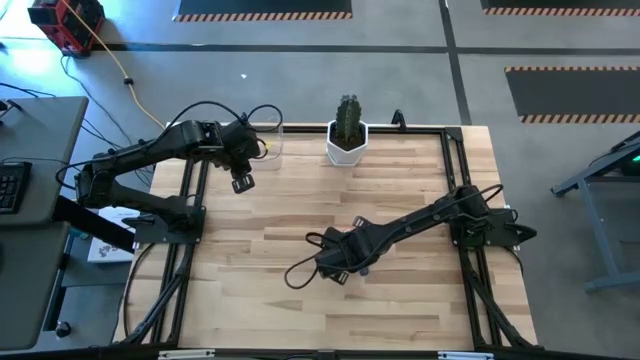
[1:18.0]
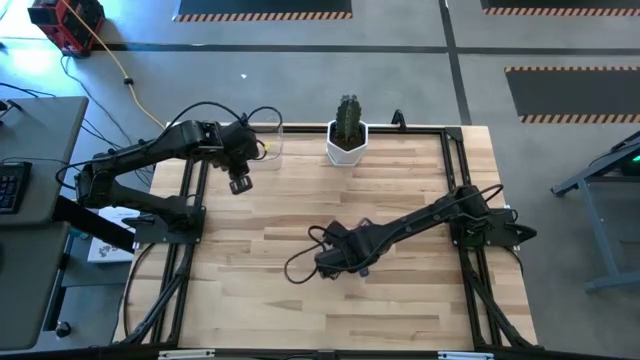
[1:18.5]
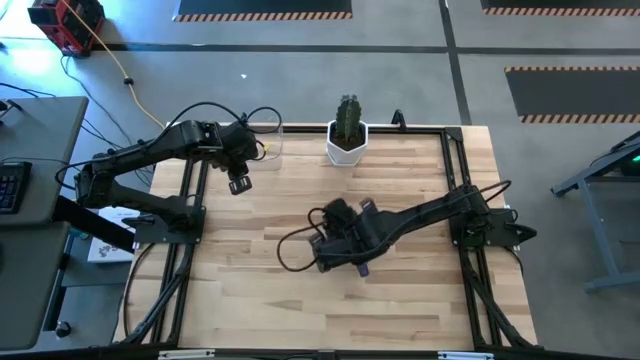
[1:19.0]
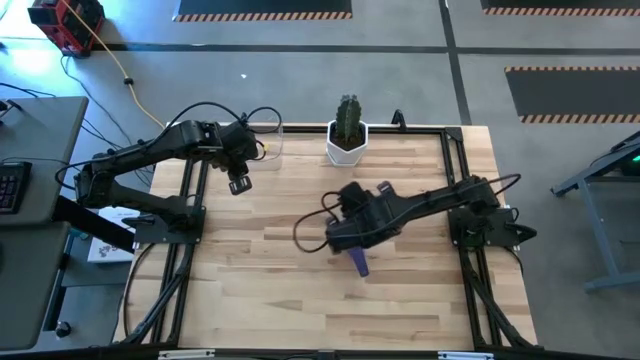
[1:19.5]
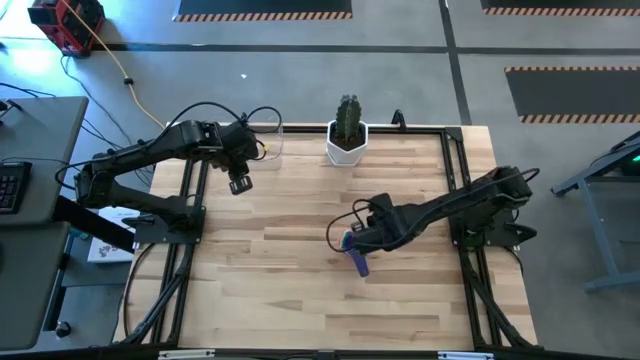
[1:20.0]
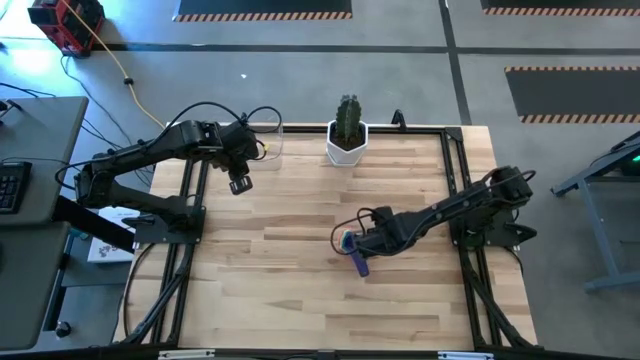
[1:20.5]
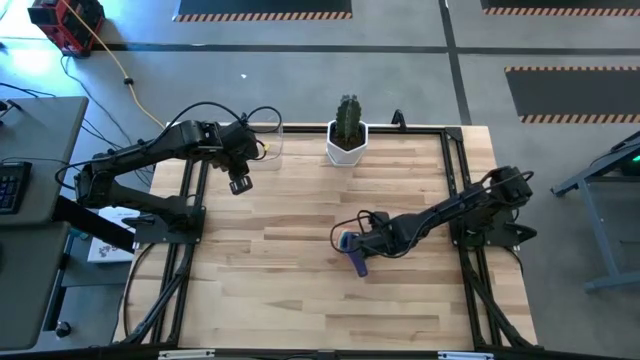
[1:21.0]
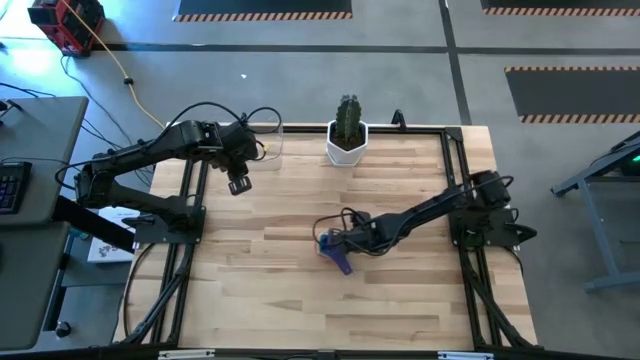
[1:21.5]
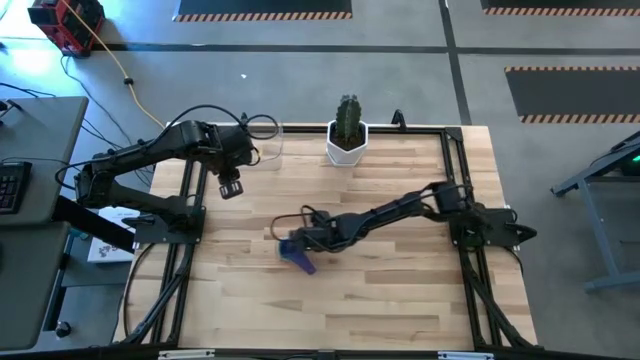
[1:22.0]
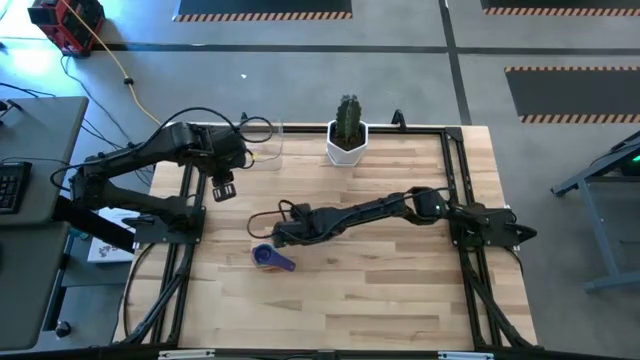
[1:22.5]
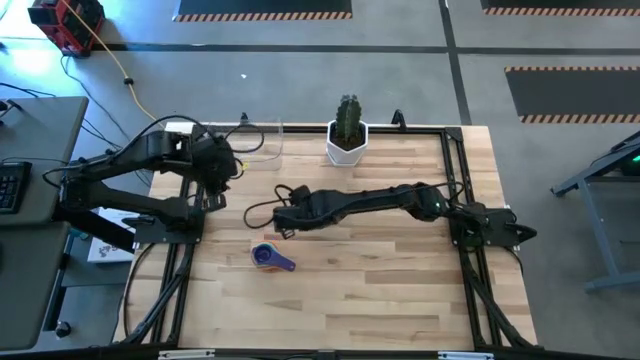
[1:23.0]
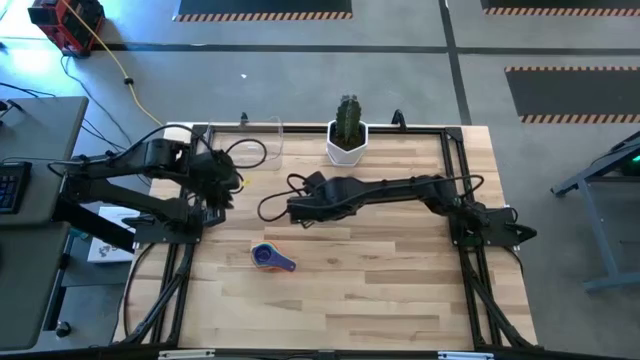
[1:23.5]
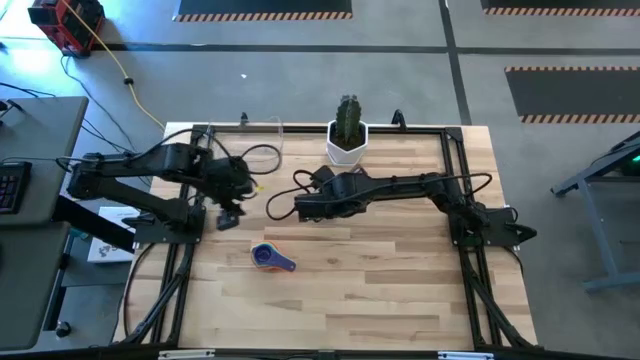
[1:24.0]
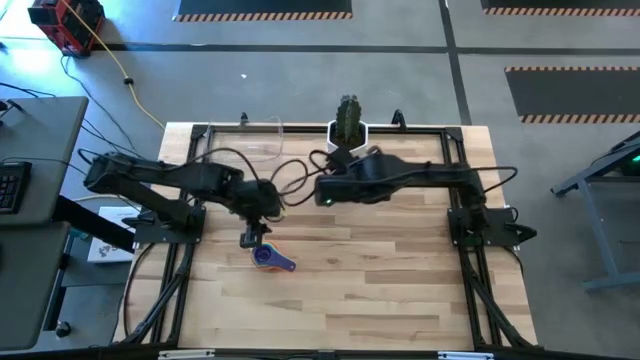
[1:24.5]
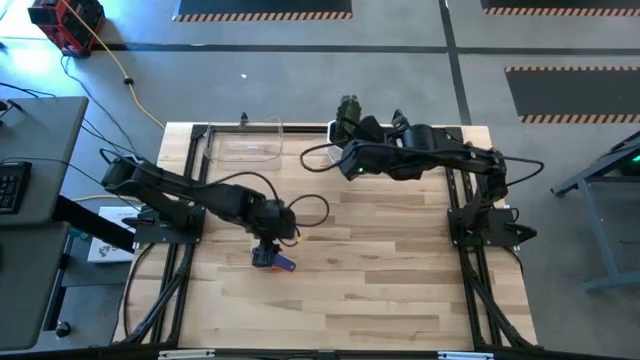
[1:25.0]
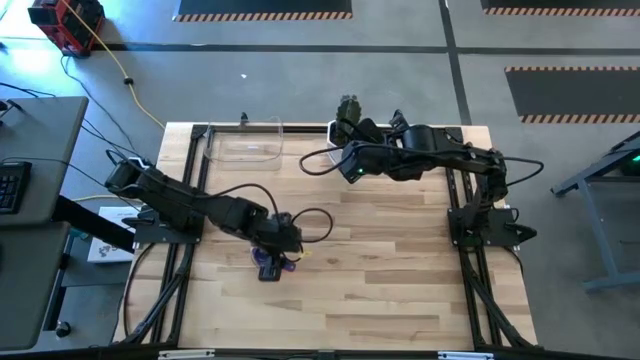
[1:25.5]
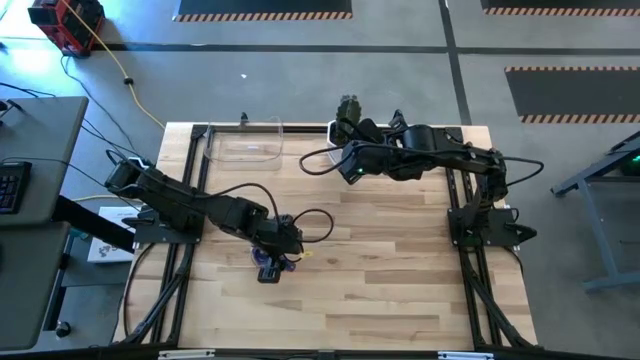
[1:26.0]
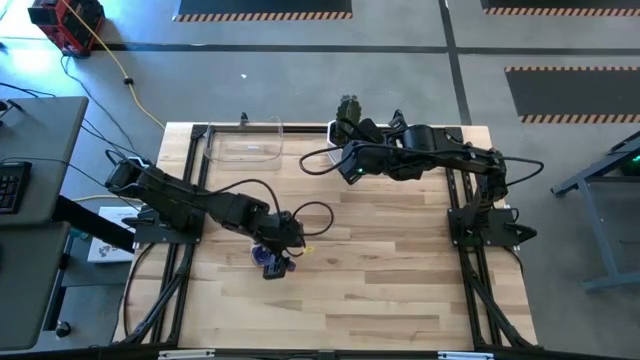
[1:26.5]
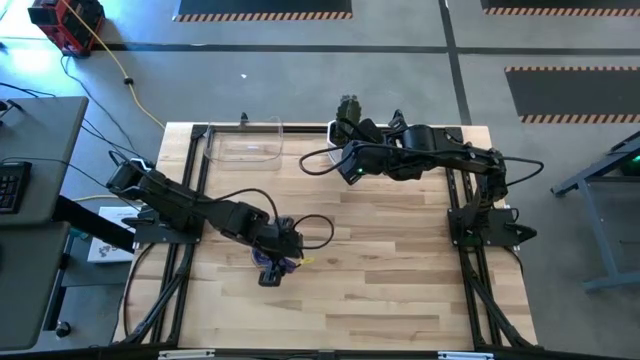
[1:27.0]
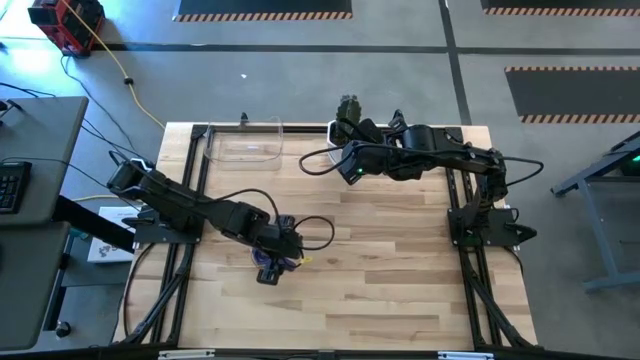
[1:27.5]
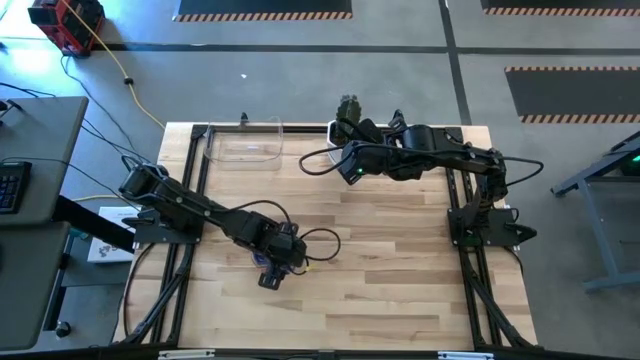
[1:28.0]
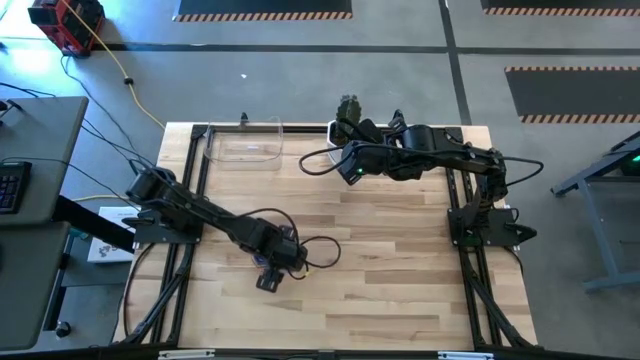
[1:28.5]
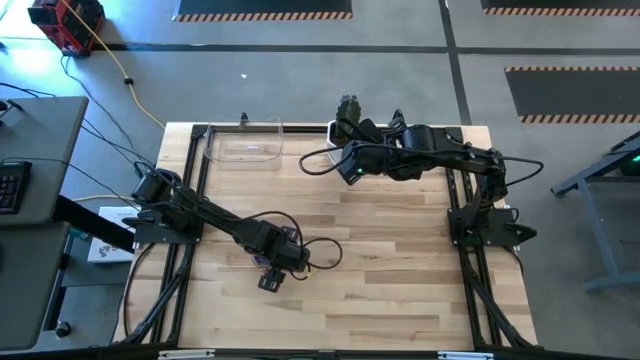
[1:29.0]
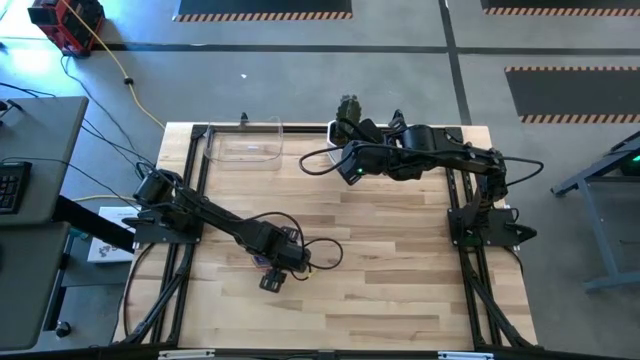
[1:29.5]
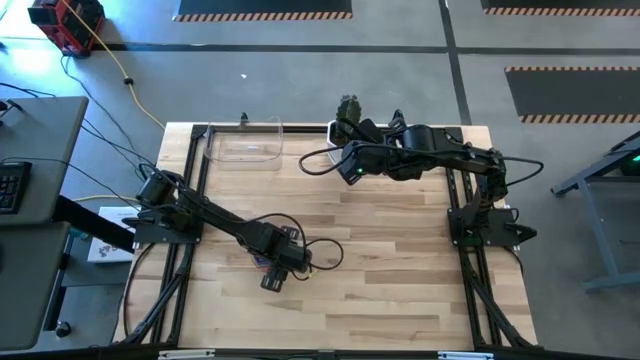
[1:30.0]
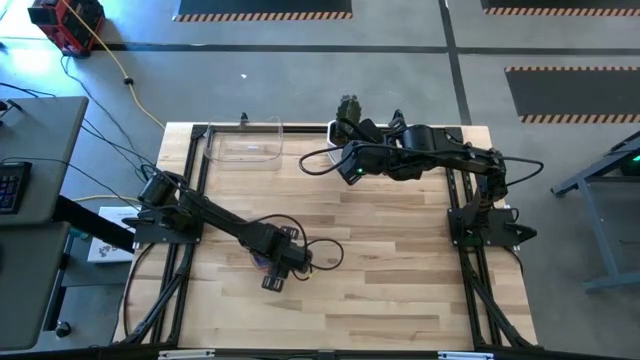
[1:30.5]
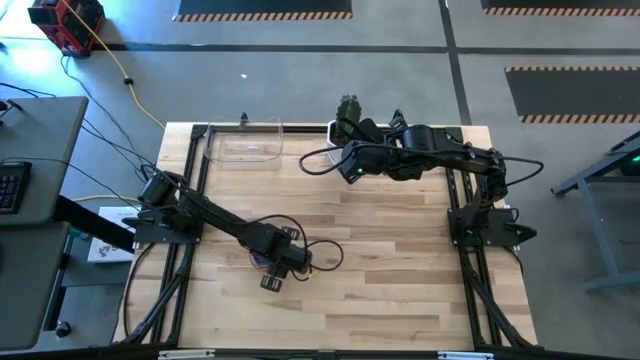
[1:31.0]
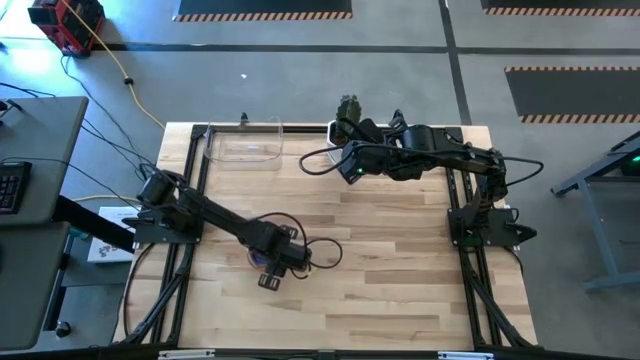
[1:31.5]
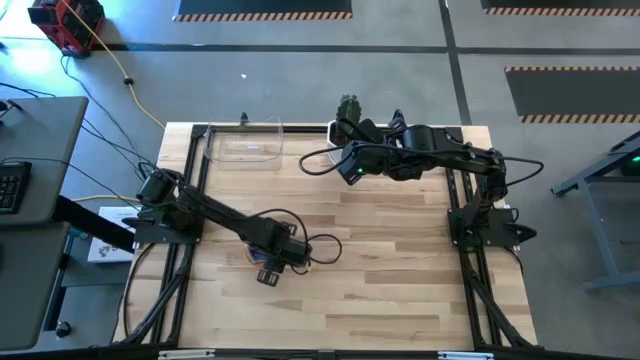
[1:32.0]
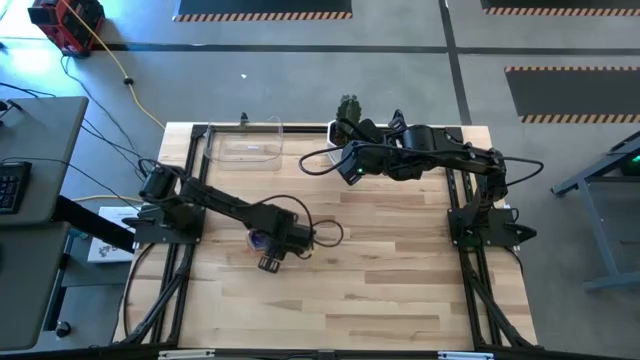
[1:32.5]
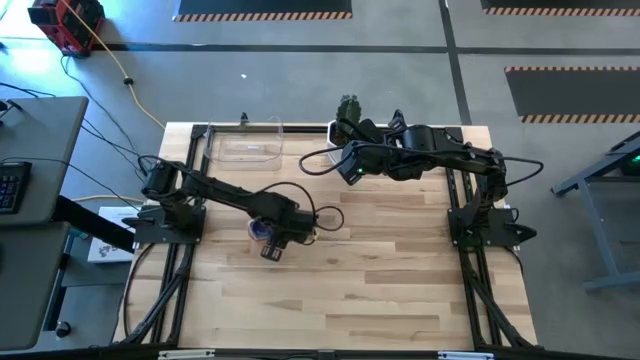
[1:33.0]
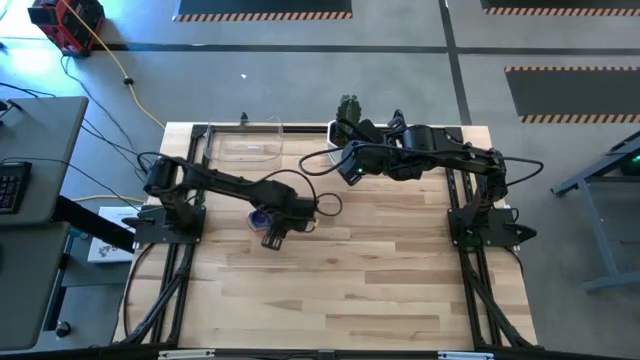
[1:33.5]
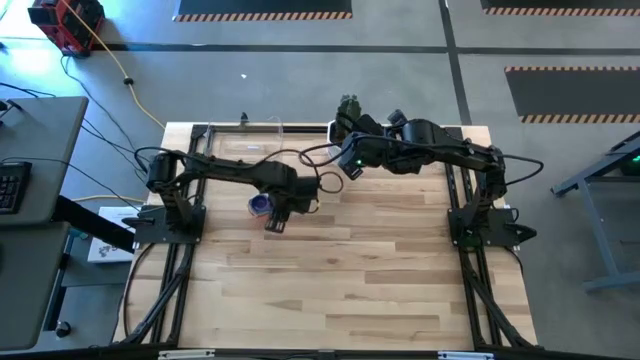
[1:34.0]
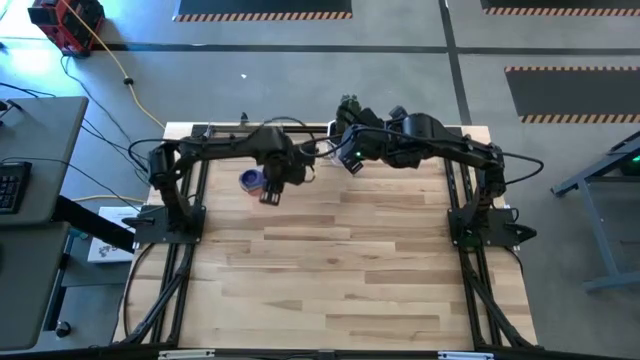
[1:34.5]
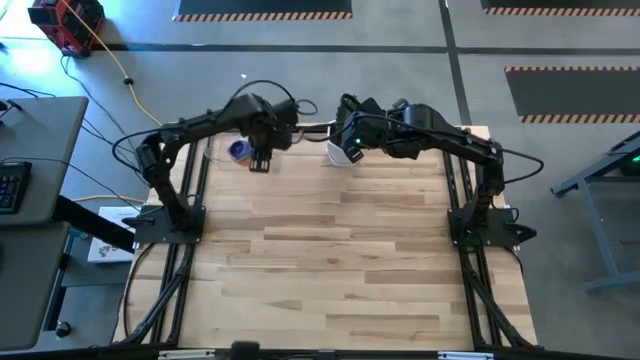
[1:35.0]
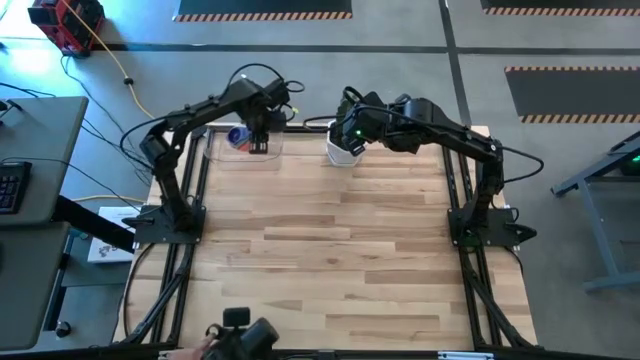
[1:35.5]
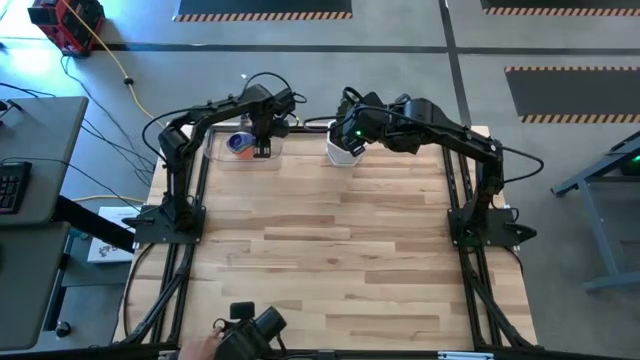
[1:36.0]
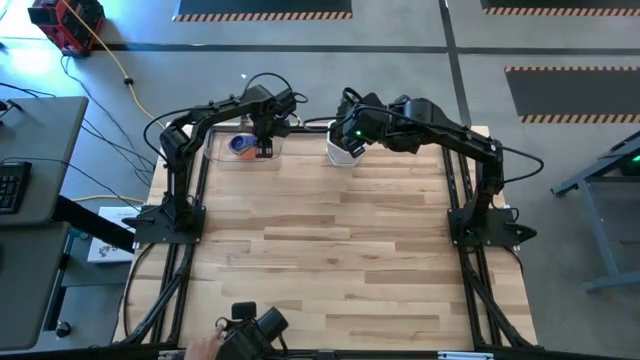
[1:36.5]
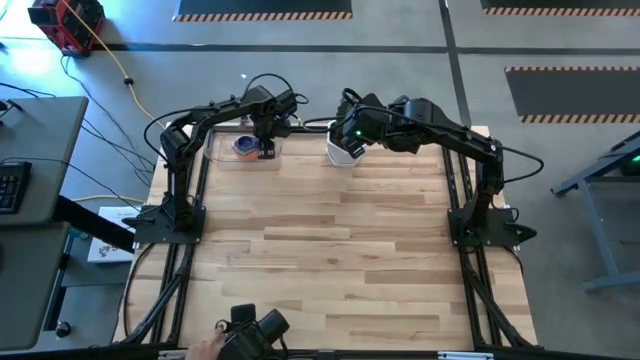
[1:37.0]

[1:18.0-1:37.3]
Task: Nest measuring cups in basket
Put the stacked measuring cups into the transparent bin

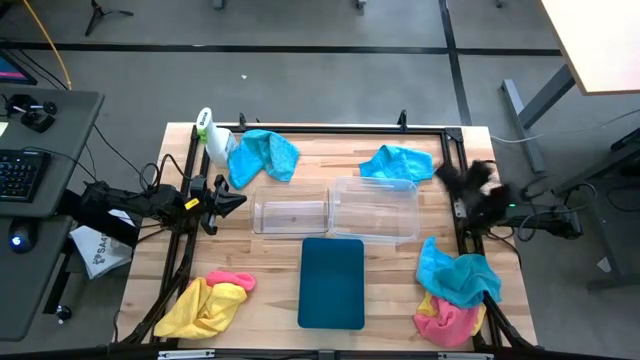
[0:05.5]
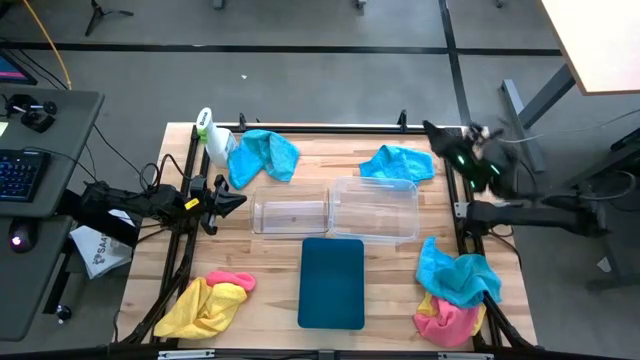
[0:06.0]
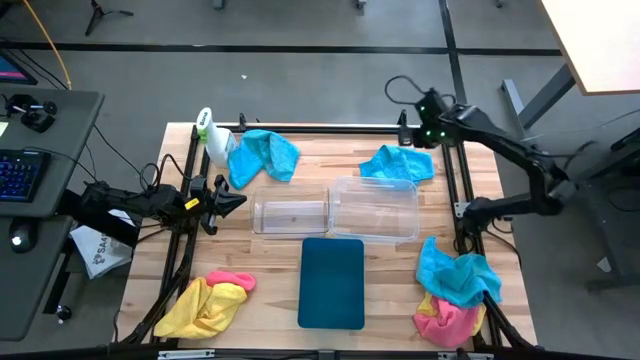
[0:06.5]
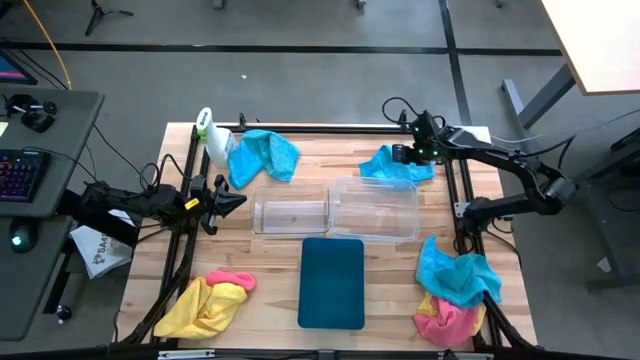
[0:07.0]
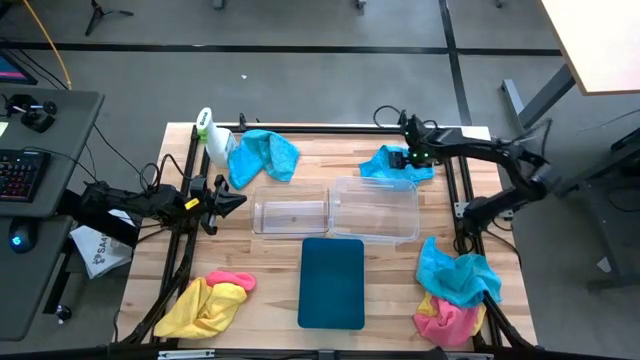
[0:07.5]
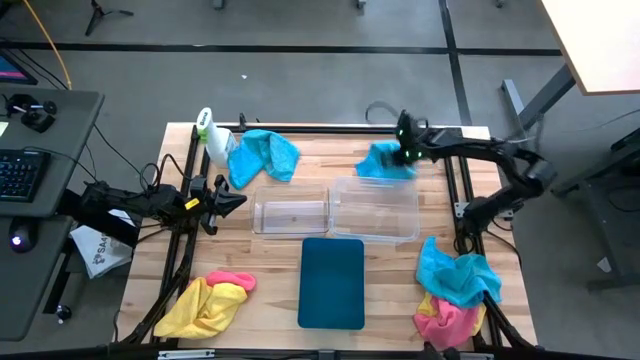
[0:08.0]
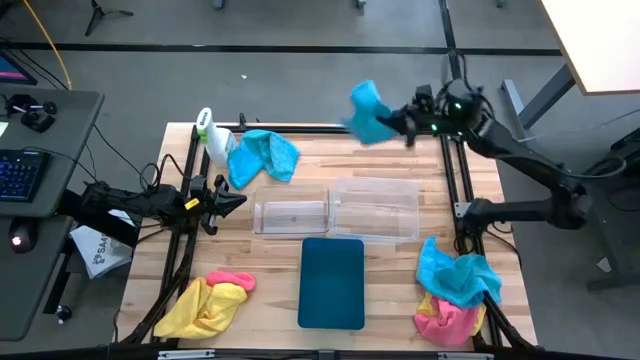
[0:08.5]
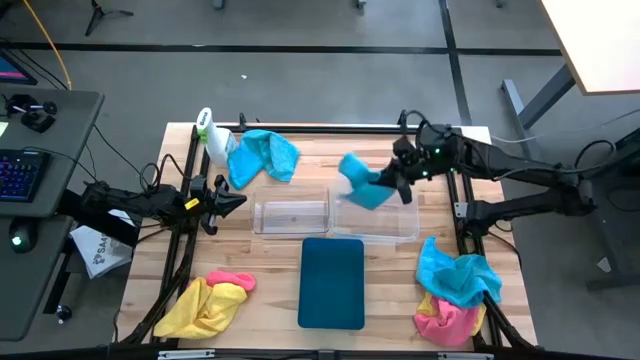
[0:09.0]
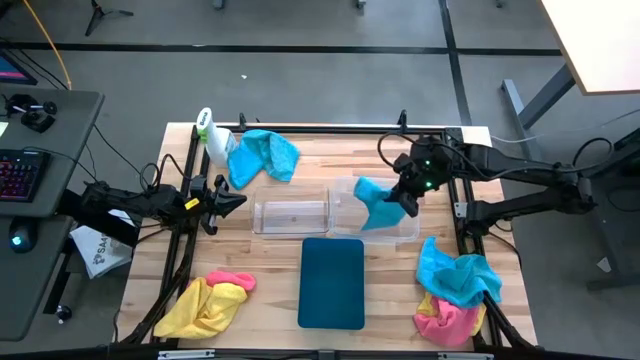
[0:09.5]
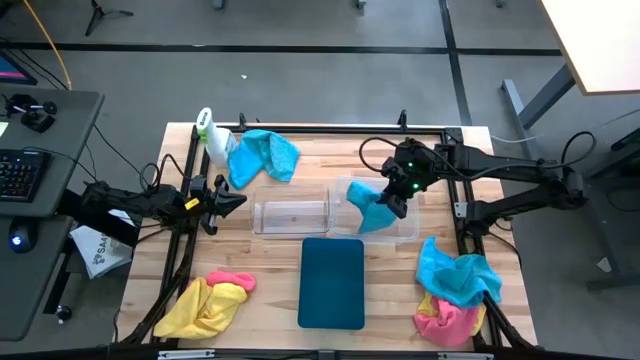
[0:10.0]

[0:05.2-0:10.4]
Task: Sort microfiber towel by color & place in baskets
Put the top right blue microfiber towel into the white bin
